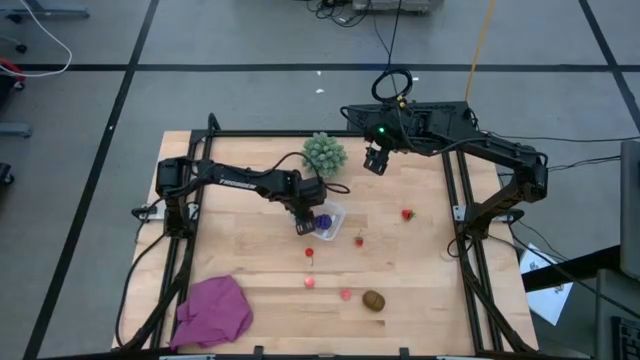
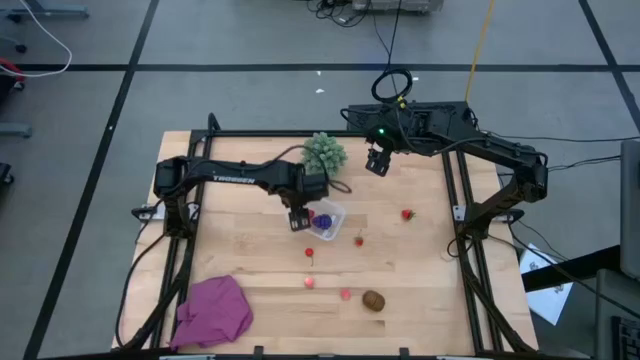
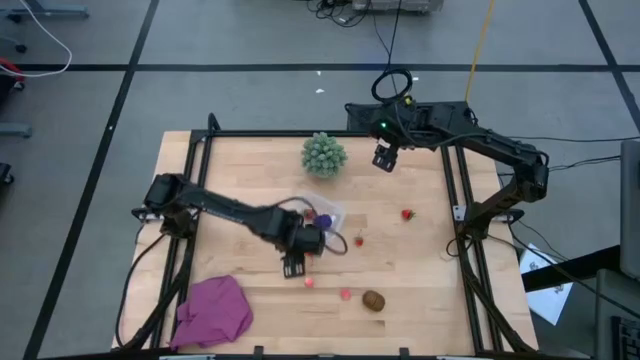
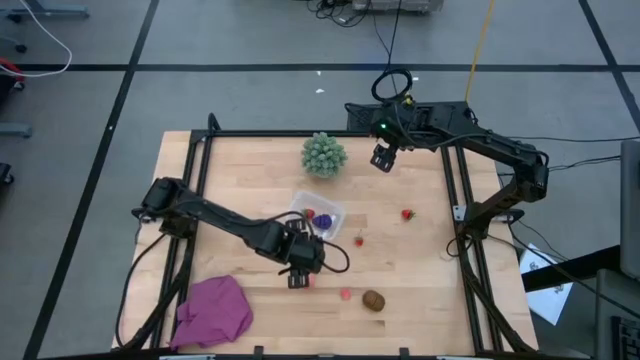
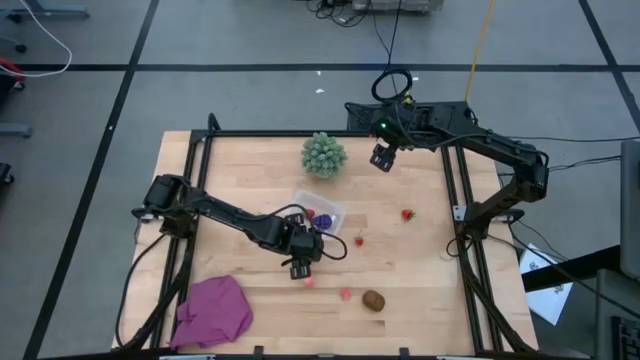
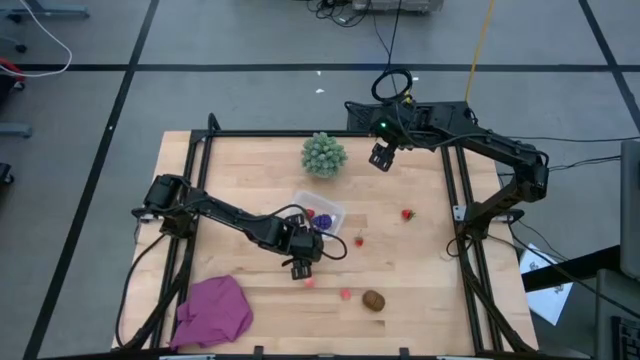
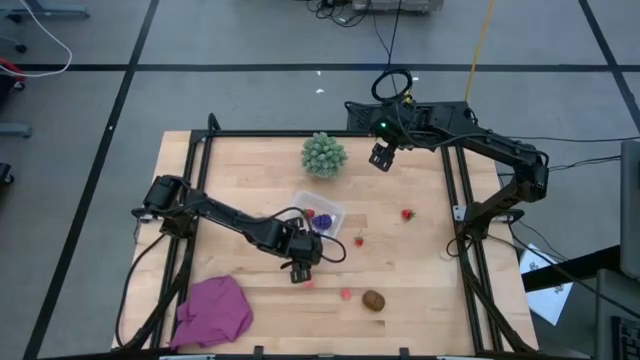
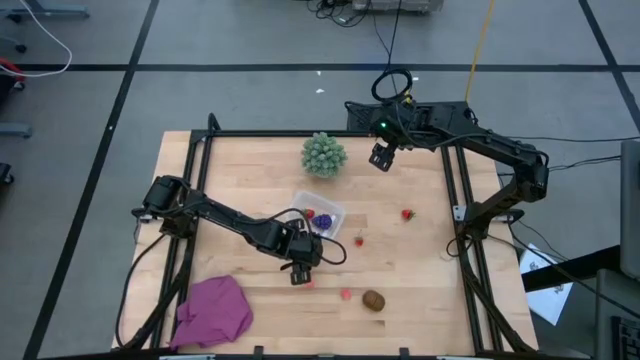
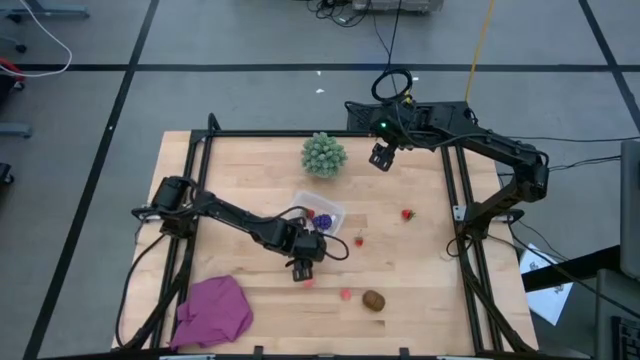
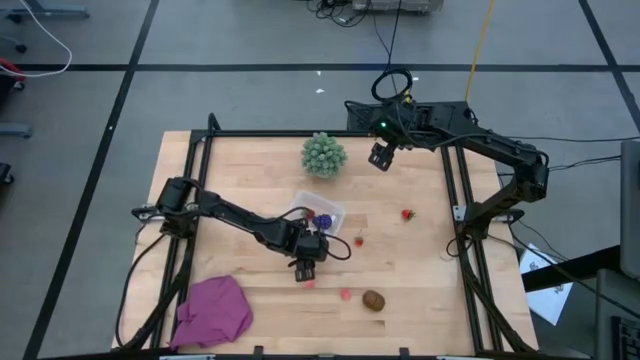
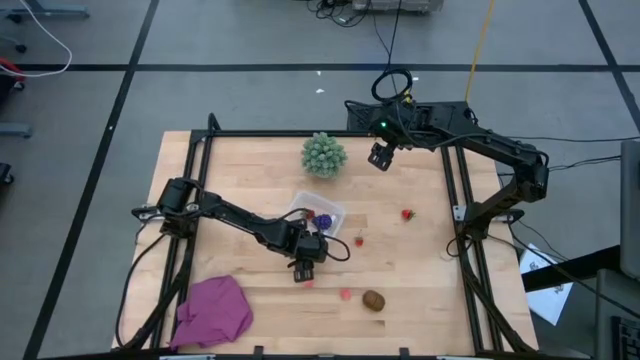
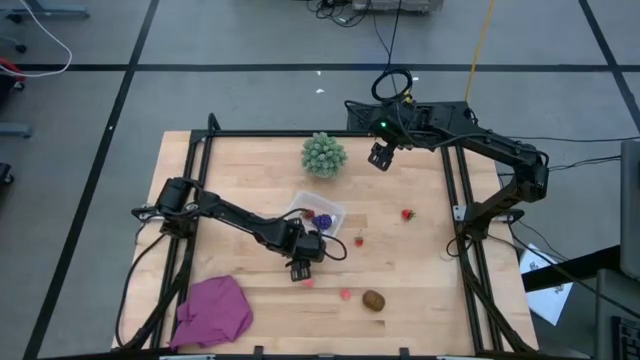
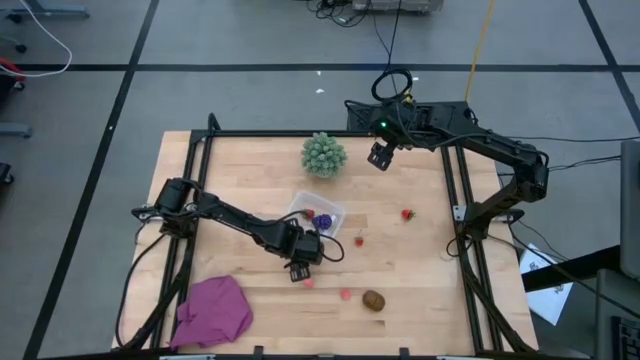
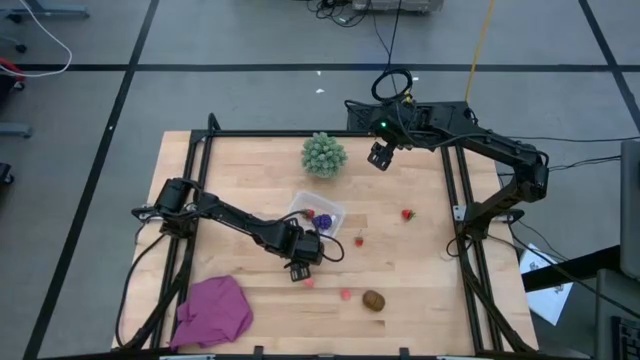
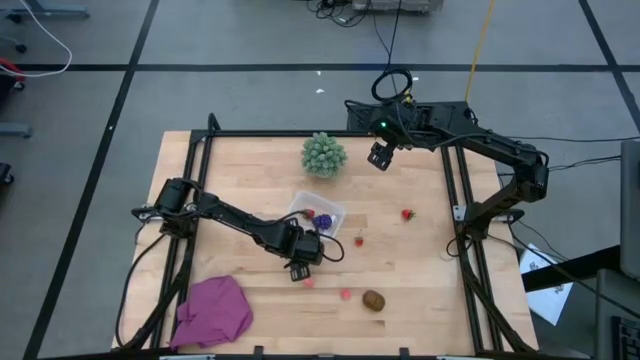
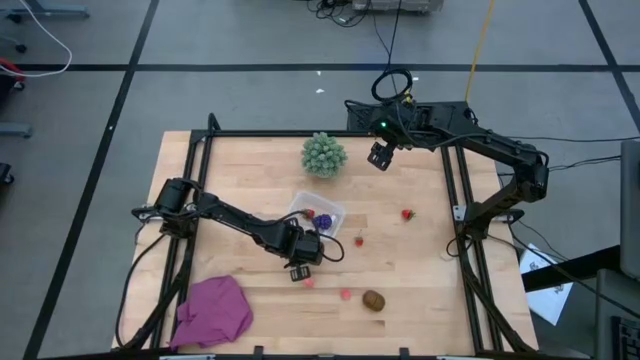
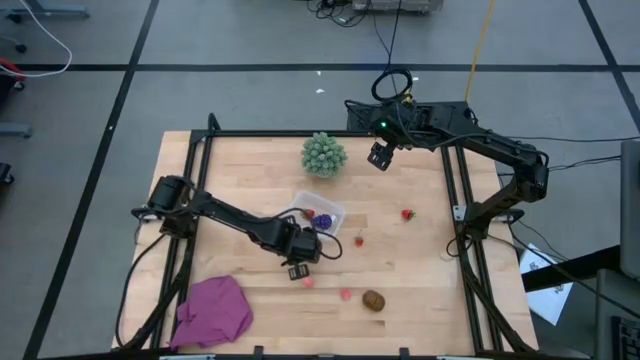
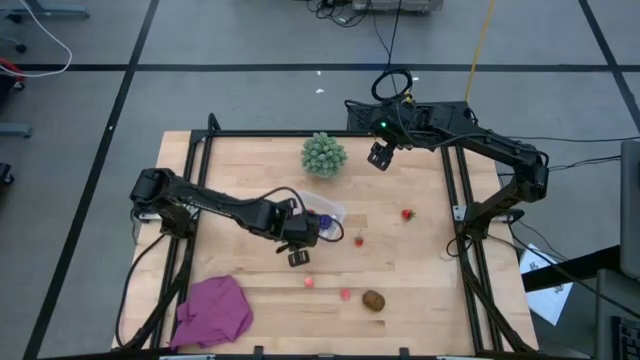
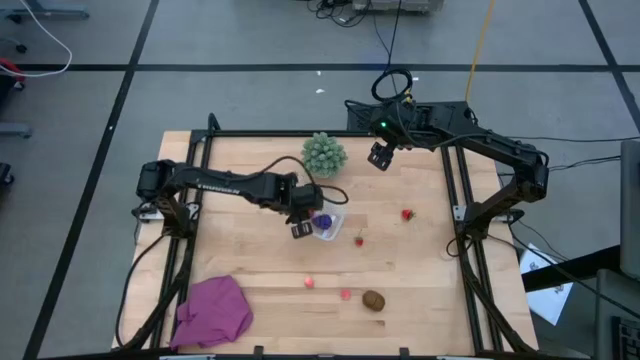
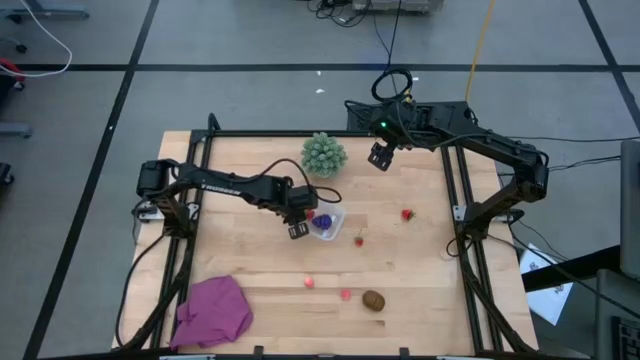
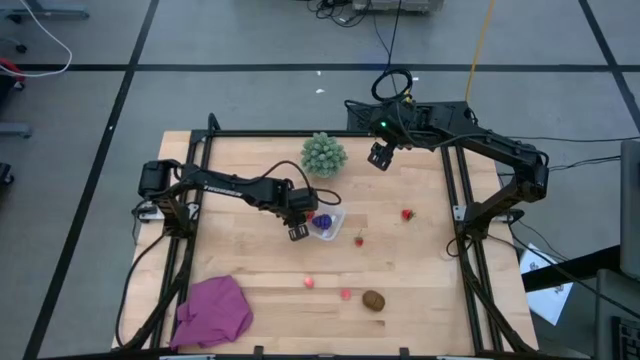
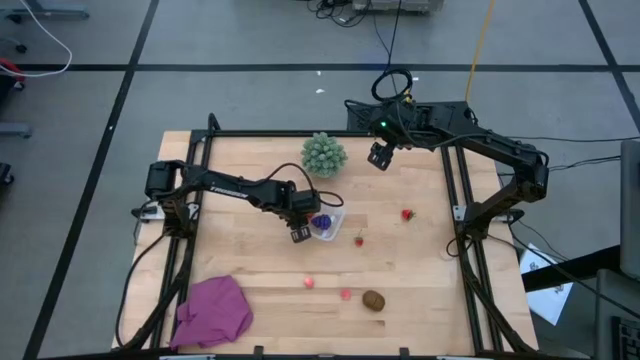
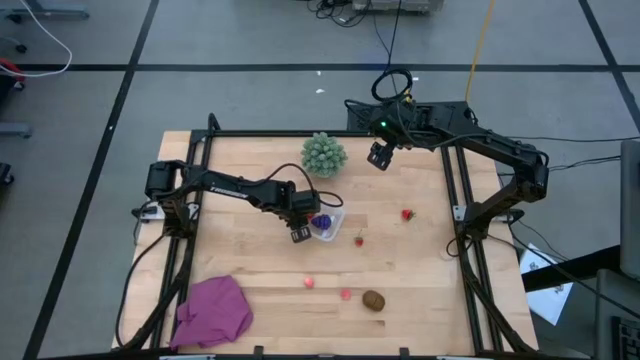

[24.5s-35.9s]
Task: Pick and placing Produce into tupperware
Put the cherry into the transparent bin

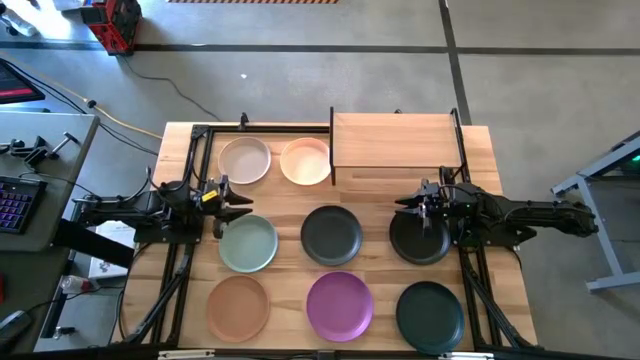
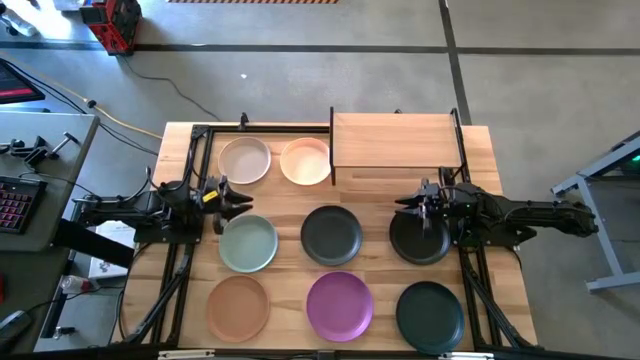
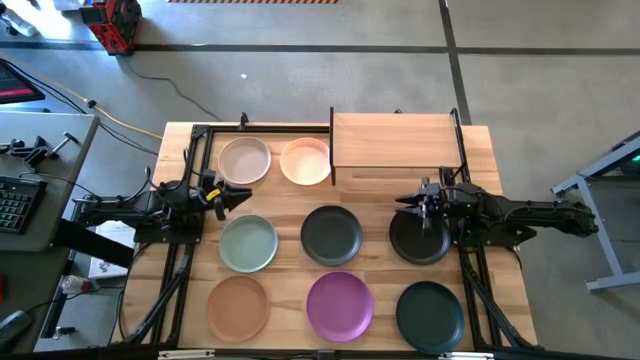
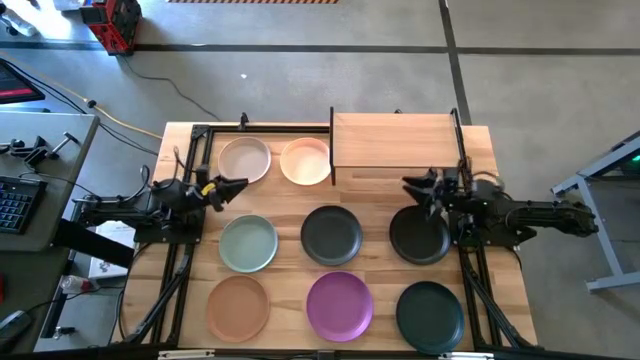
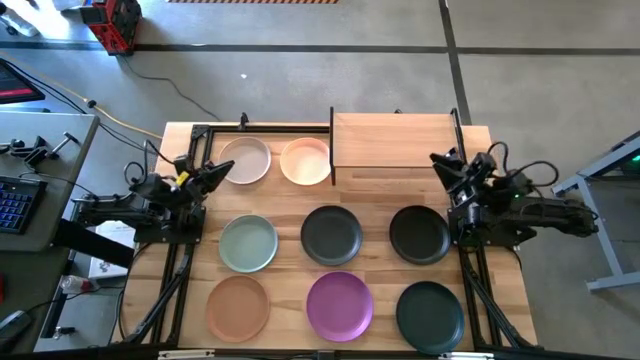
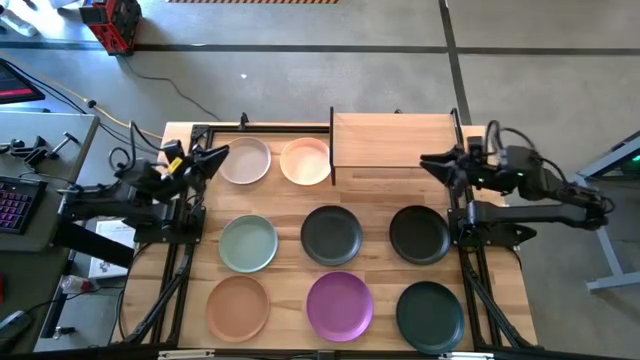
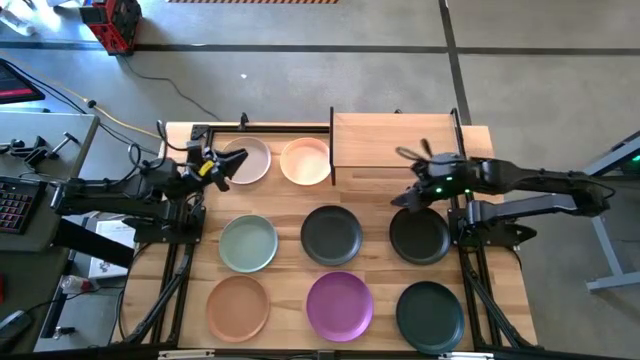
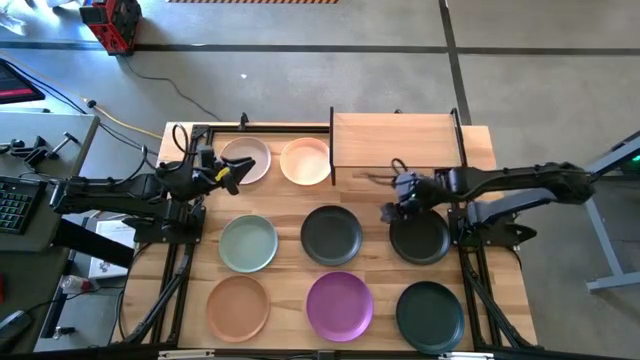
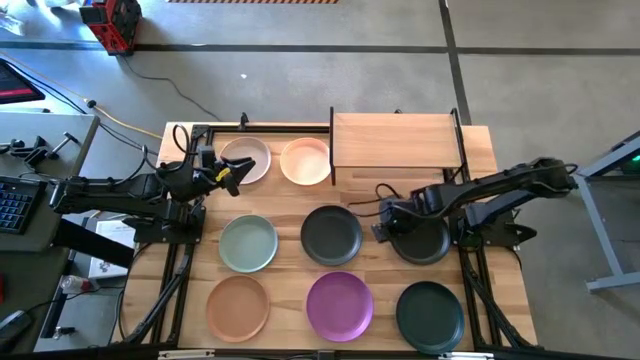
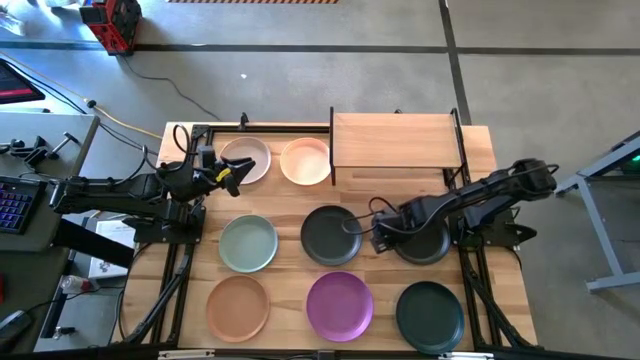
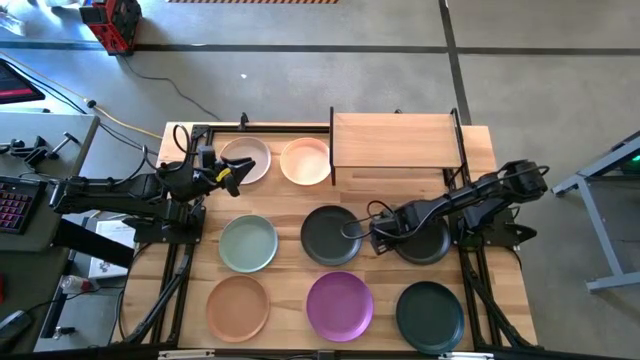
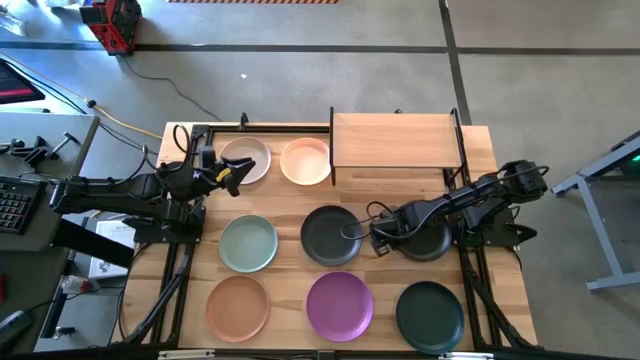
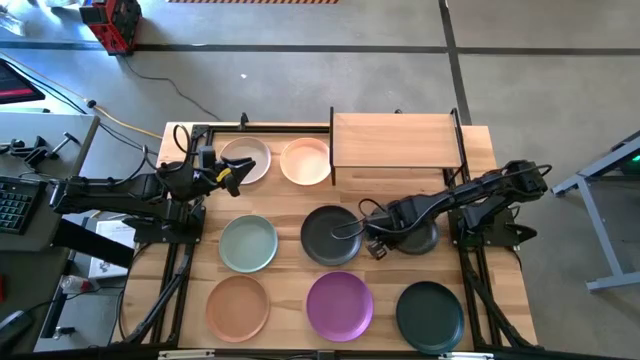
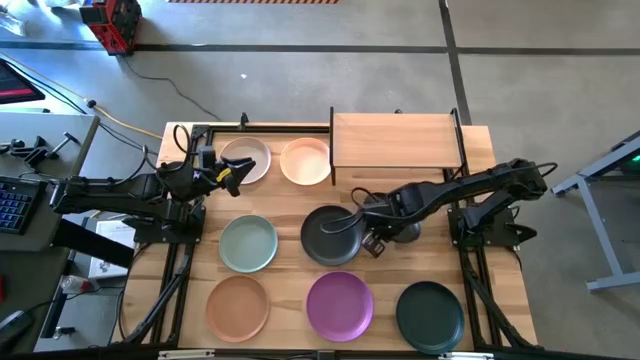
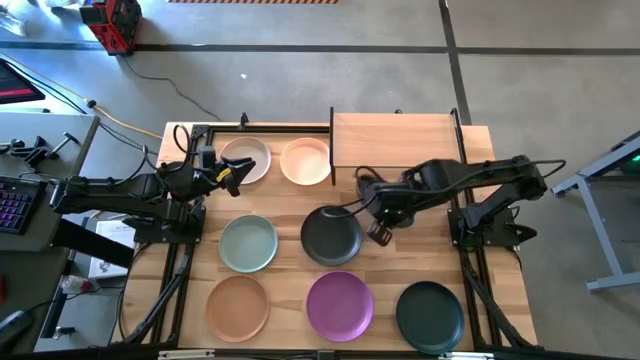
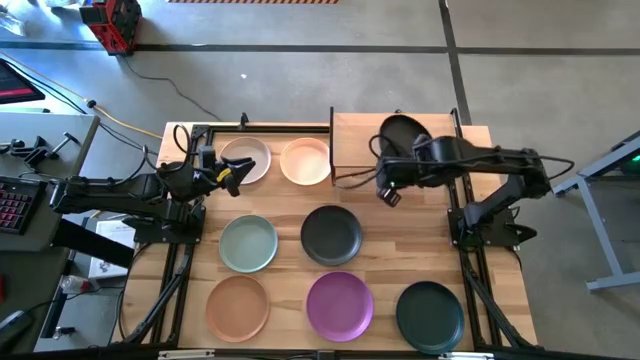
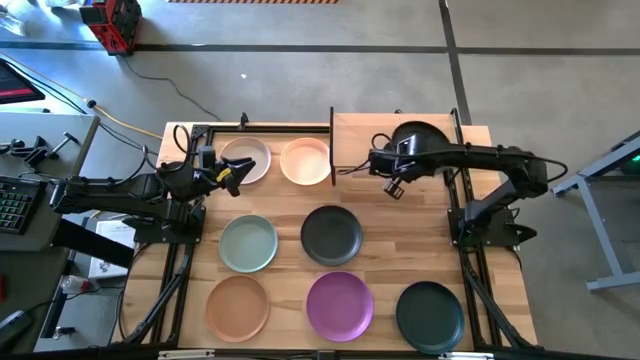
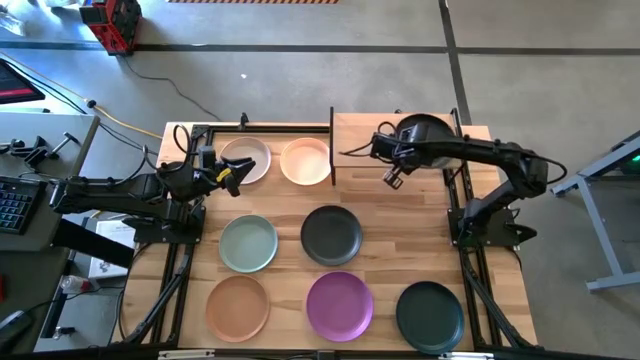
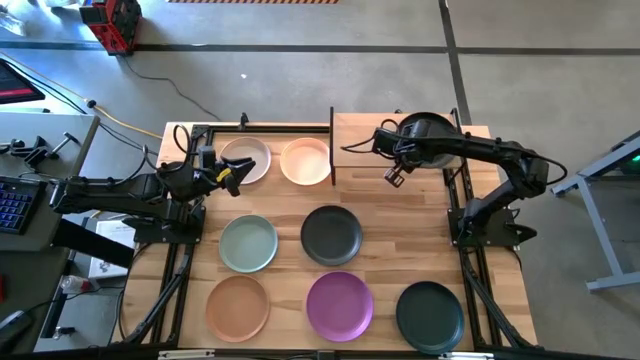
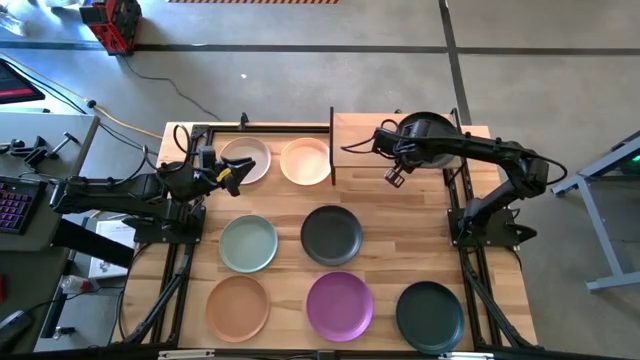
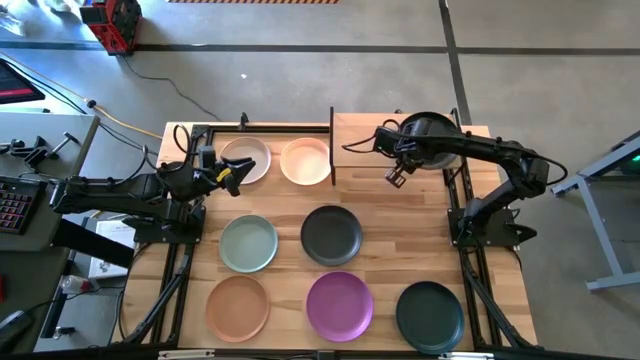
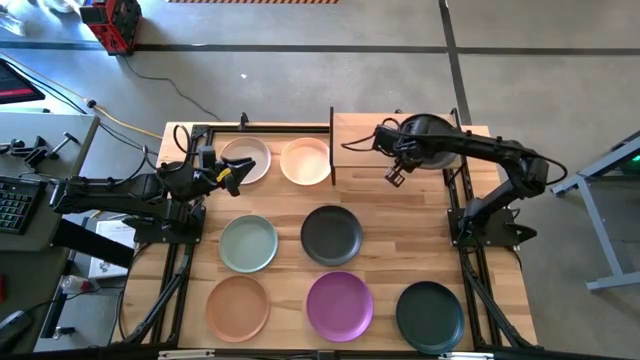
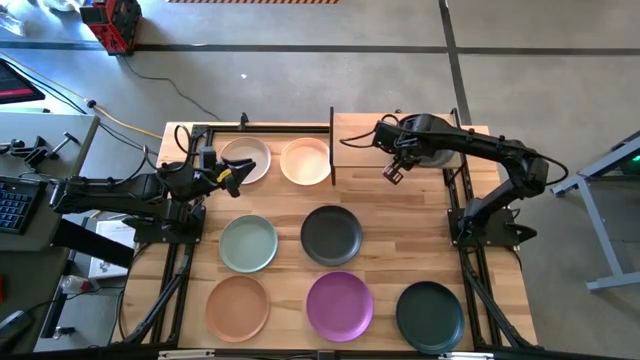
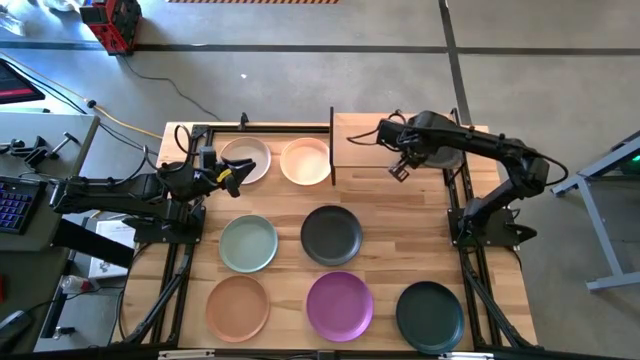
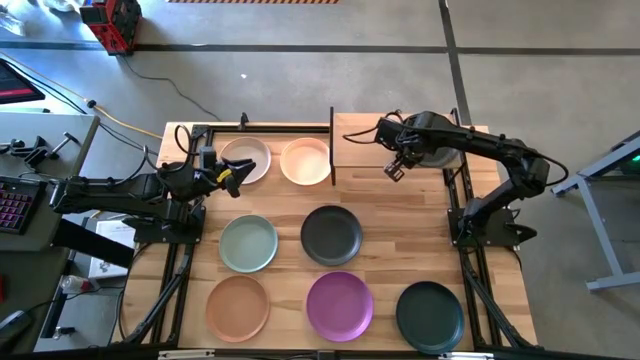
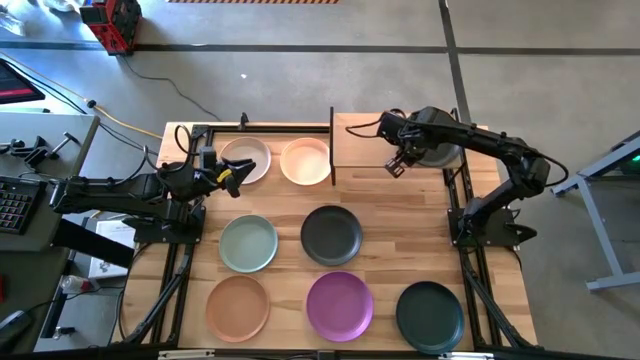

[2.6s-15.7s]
Task: Place and stack plates onto a shelf
Put the top right black plate on the shelf
